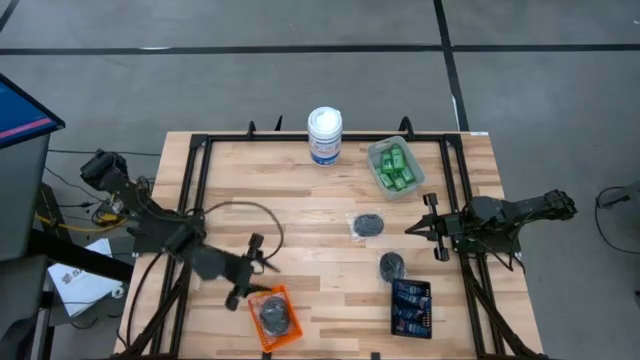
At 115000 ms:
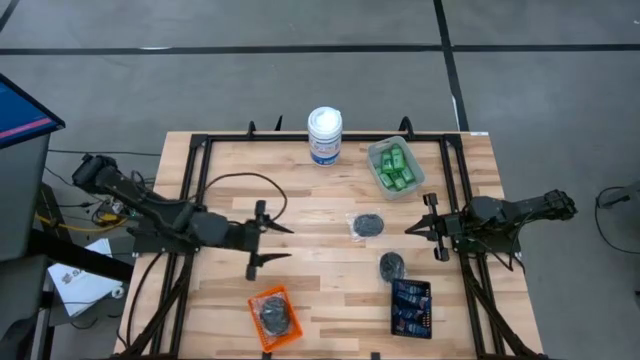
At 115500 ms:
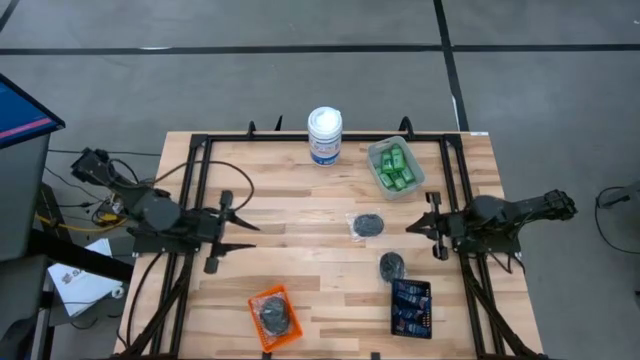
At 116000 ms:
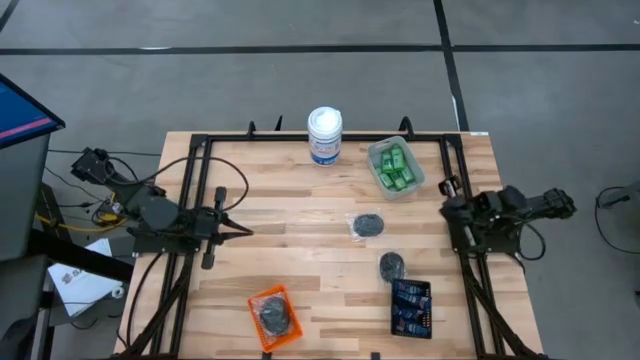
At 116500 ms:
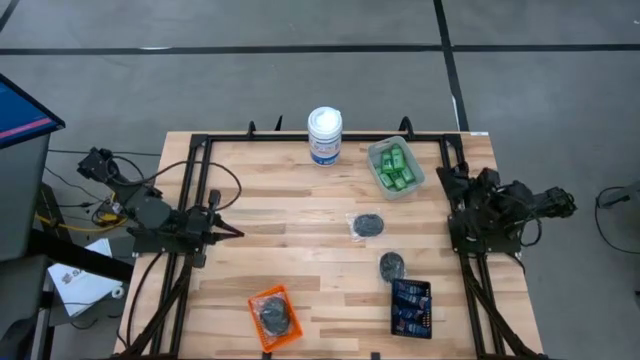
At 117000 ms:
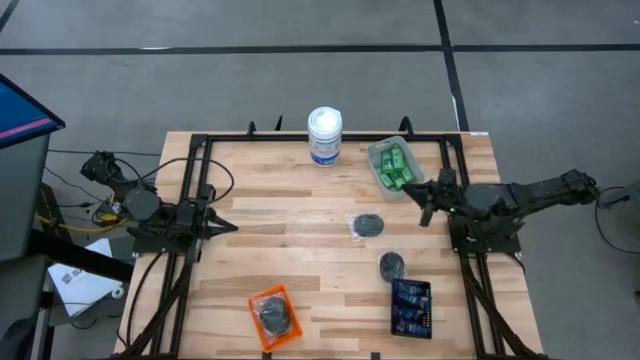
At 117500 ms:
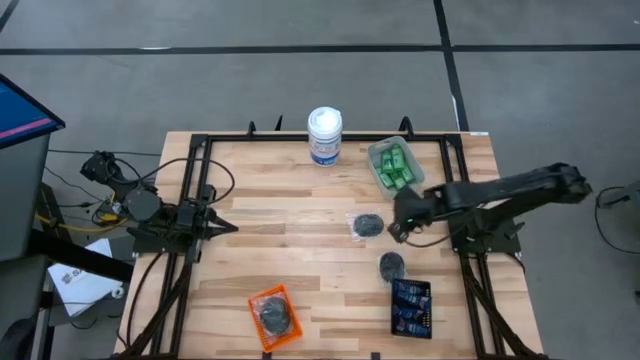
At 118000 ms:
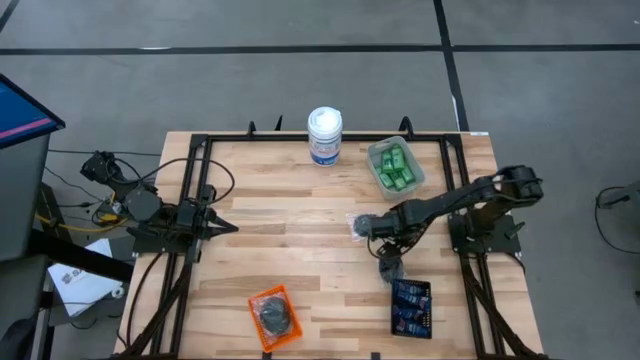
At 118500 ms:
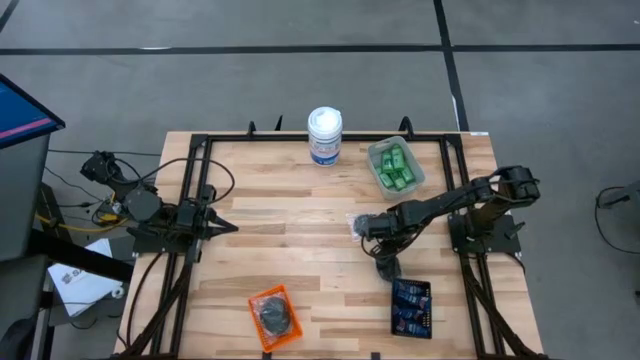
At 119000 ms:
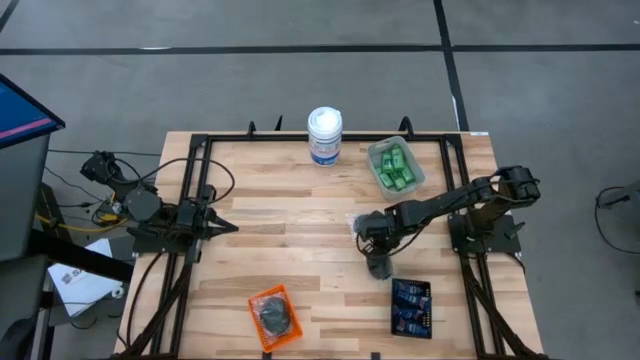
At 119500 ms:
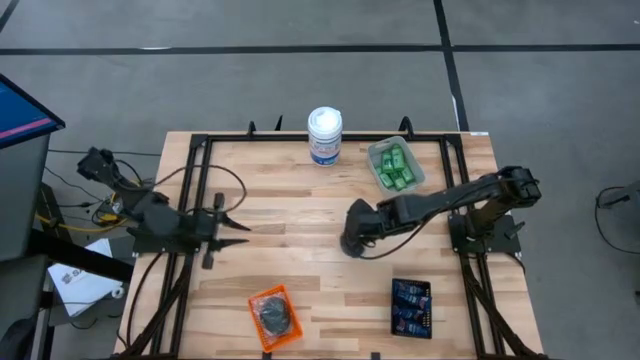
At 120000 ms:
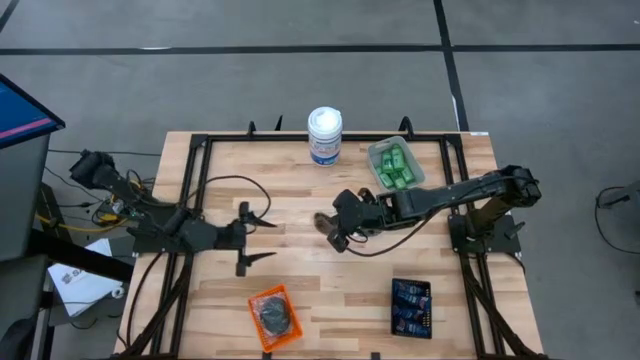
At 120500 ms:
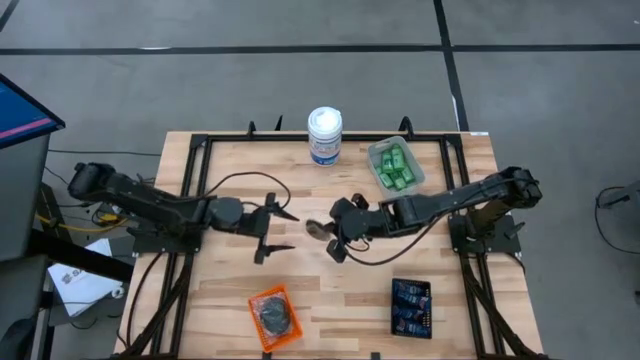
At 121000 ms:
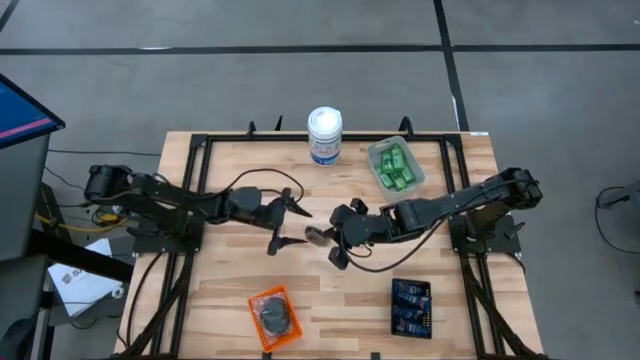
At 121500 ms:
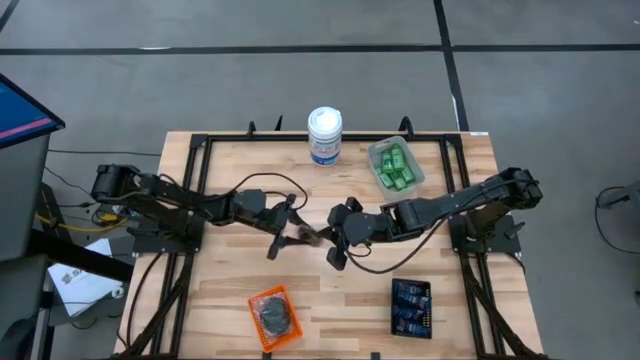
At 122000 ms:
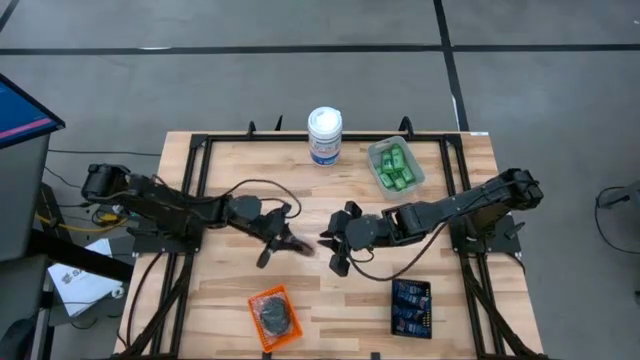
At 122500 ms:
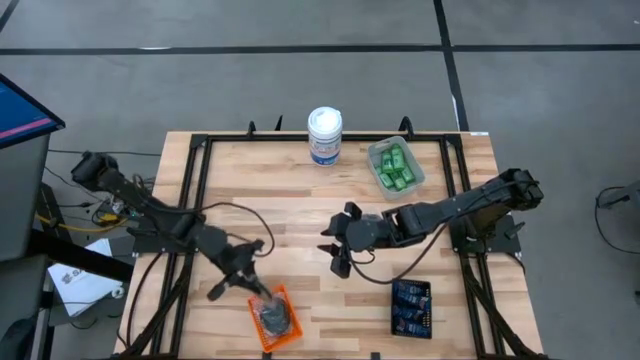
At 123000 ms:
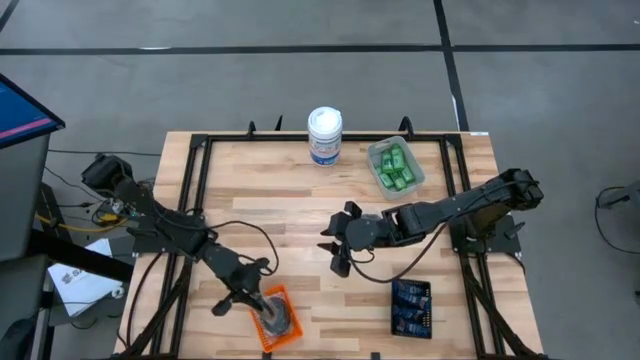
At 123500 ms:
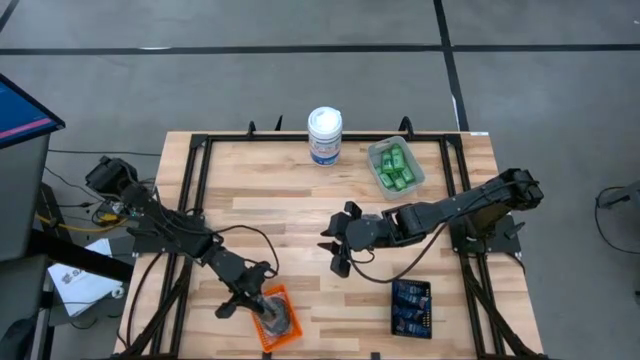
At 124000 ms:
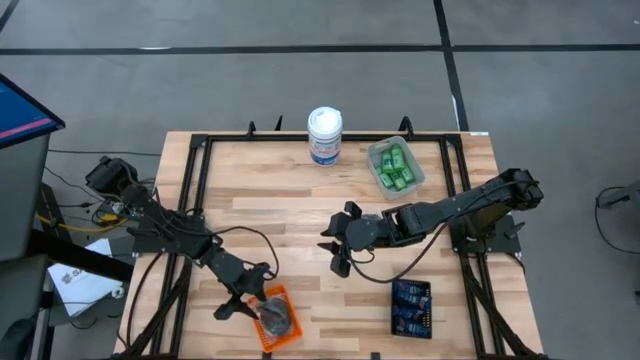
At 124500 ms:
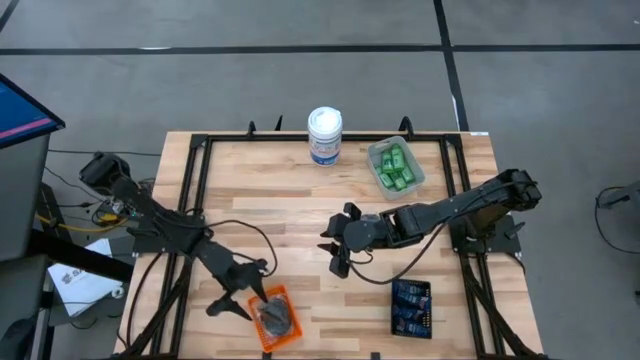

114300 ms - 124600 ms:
Task: Pick & Place Travel size toiletries
Put the black scrub pad into the orange basket

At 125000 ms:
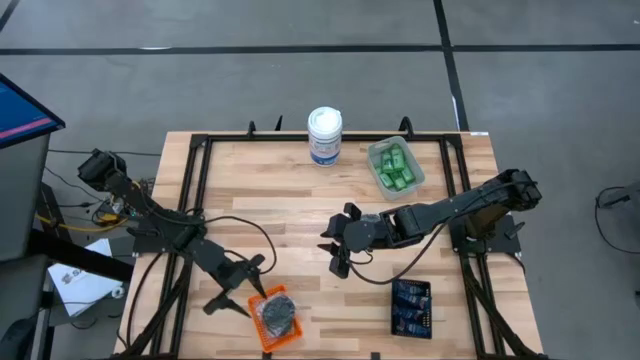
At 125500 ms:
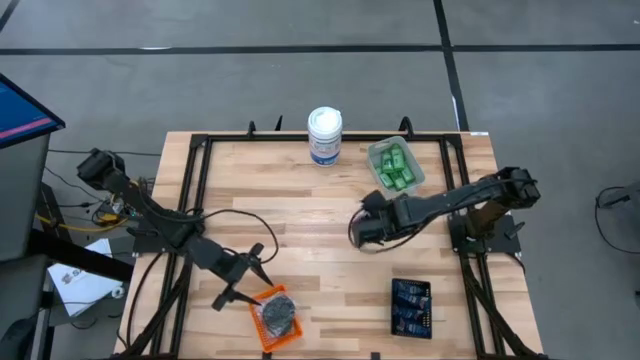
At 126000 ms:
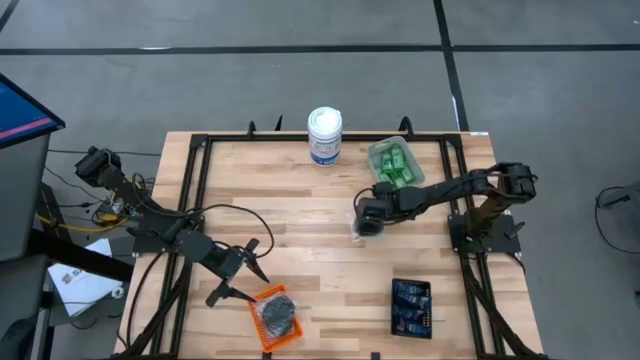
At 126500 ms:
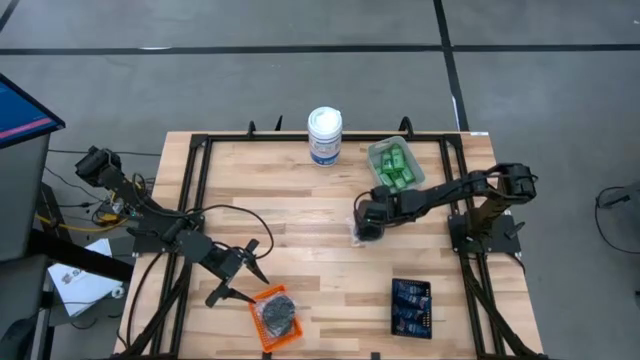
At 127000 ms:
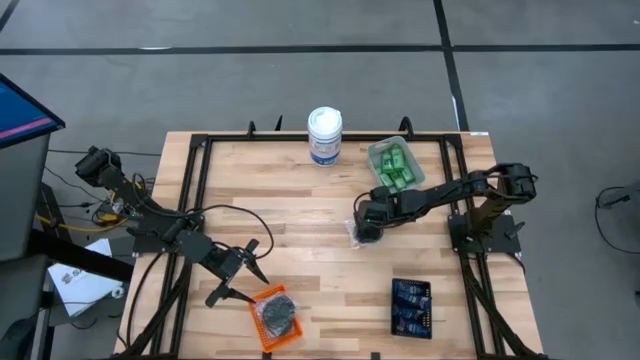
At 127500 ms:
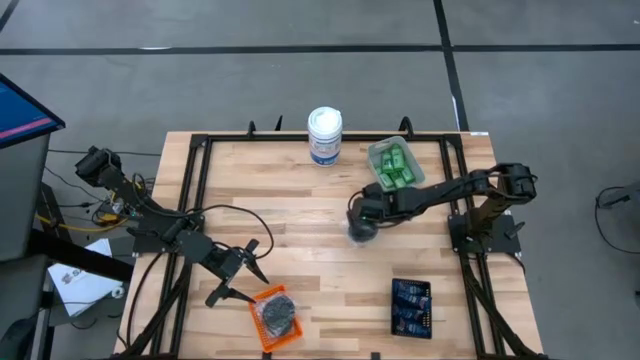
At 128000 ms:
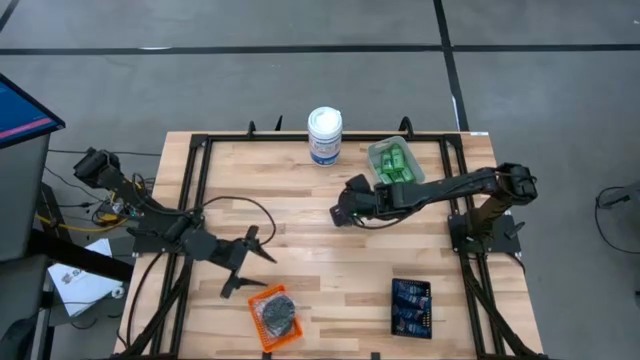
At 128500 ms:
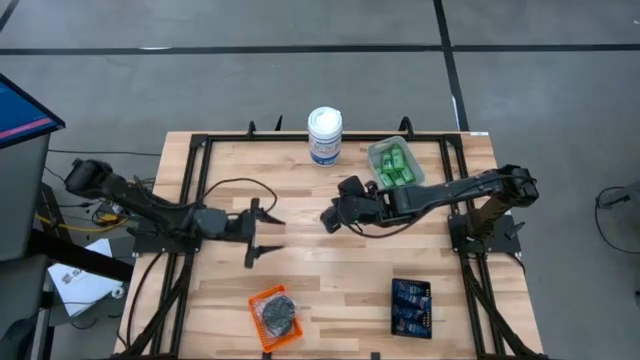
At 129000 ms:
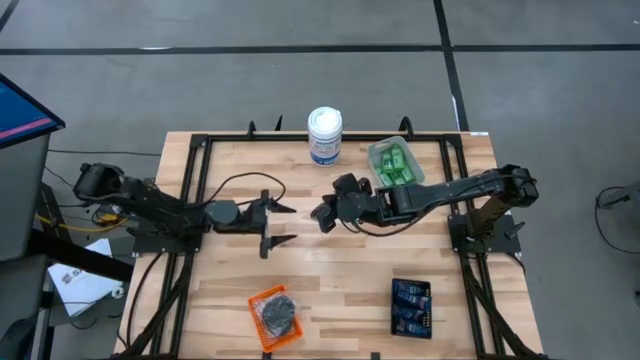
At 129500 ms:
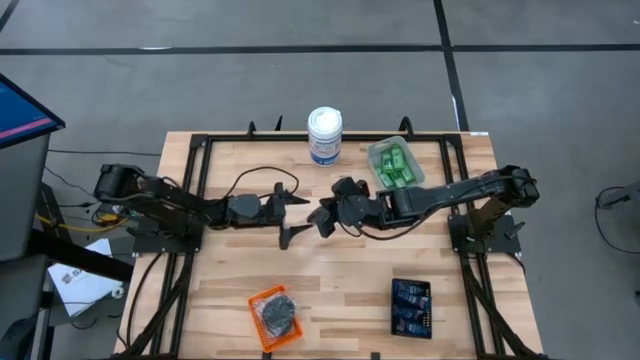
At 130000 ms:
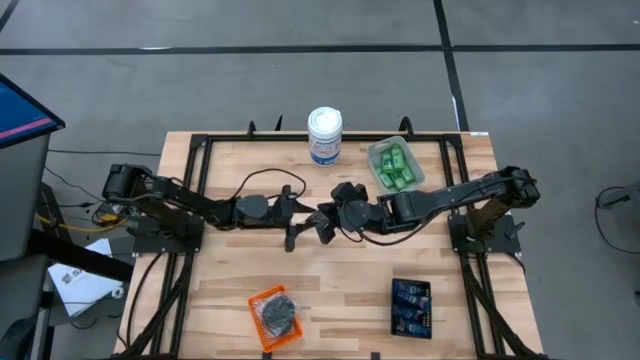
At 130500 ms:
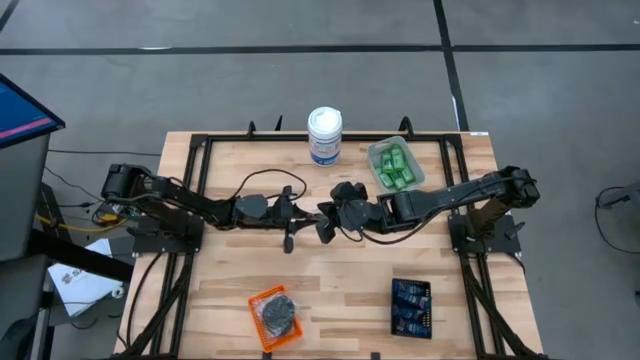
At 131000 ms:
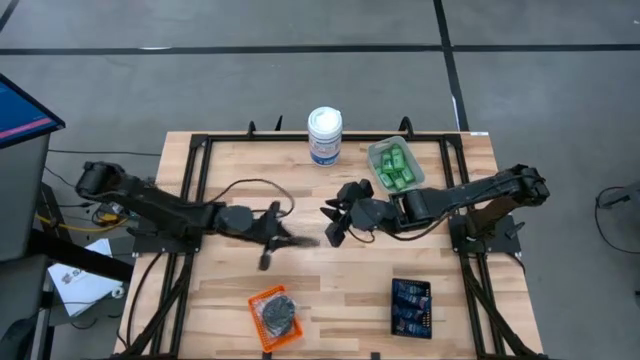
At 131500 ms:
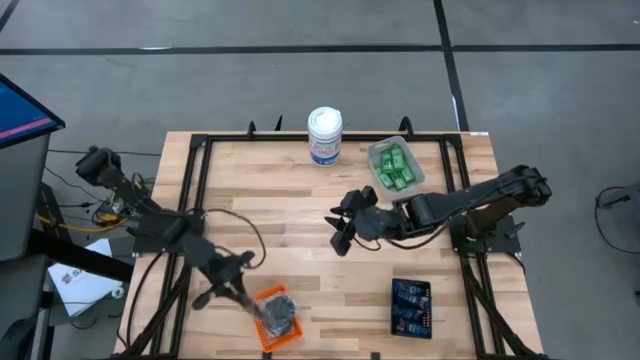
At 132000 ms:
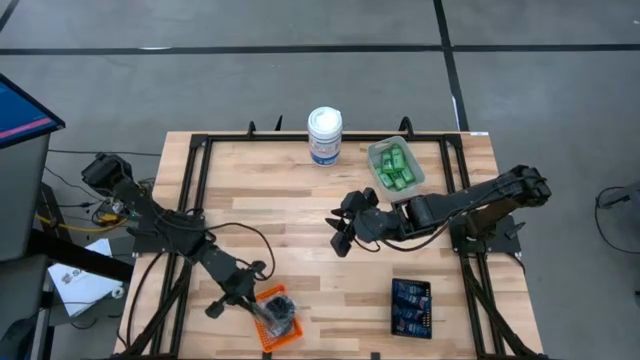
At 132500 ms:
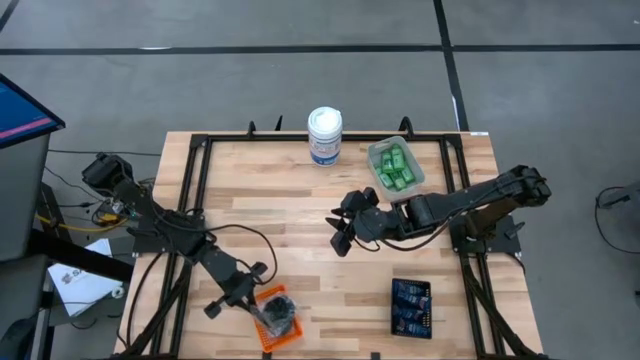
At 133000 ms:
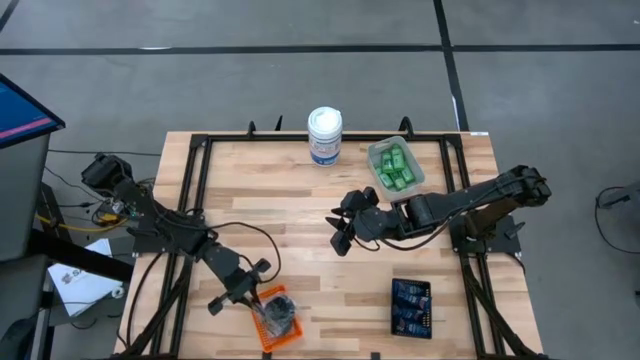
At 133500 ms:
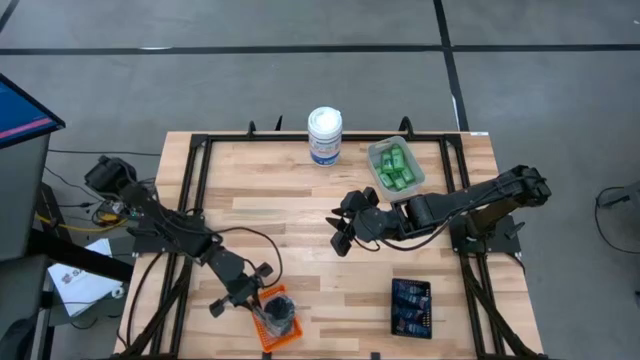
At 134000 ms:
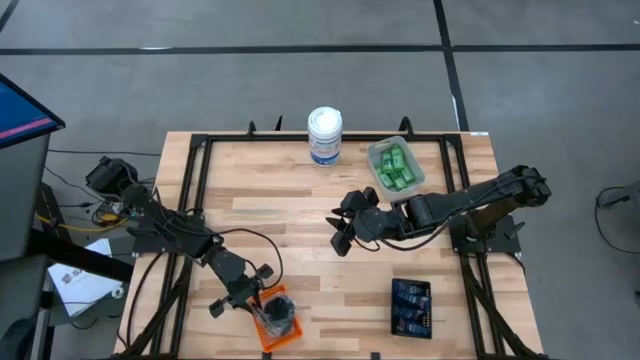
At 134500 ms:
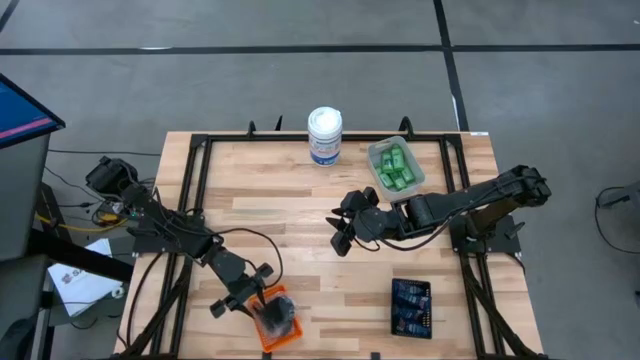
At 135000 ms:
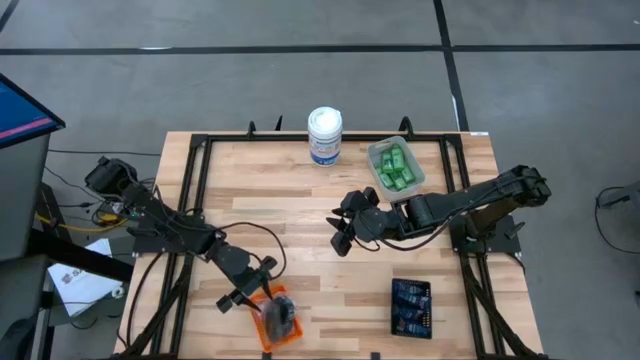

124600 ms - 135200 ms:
Put the black scrub pad into the orange basket

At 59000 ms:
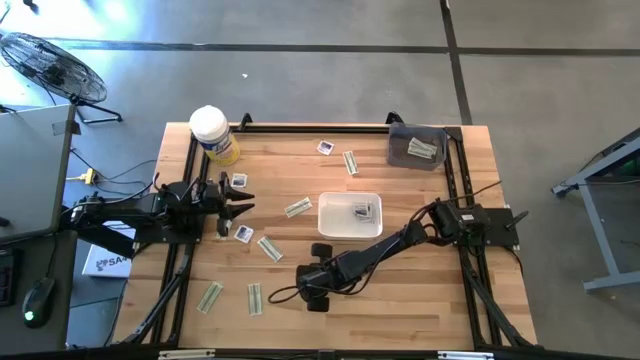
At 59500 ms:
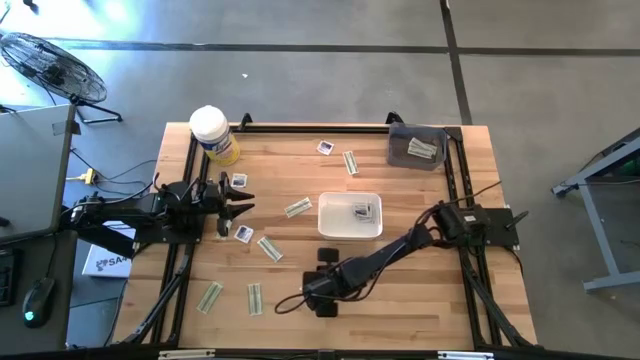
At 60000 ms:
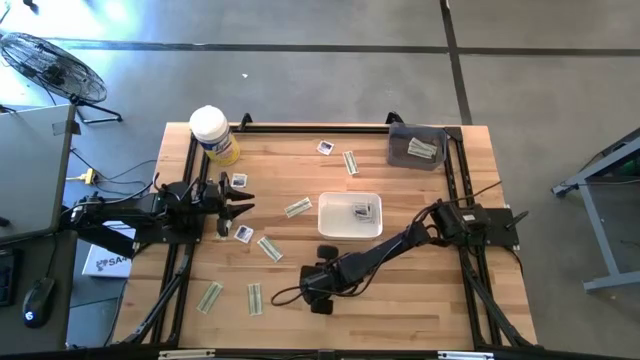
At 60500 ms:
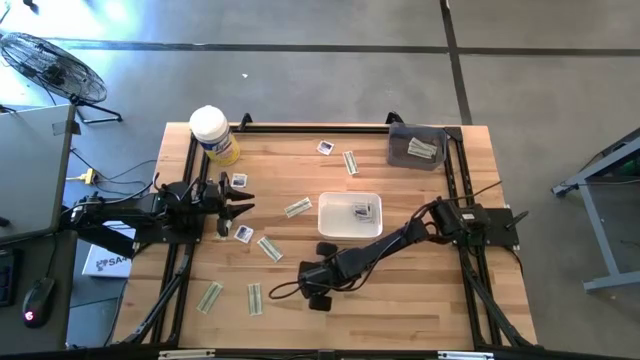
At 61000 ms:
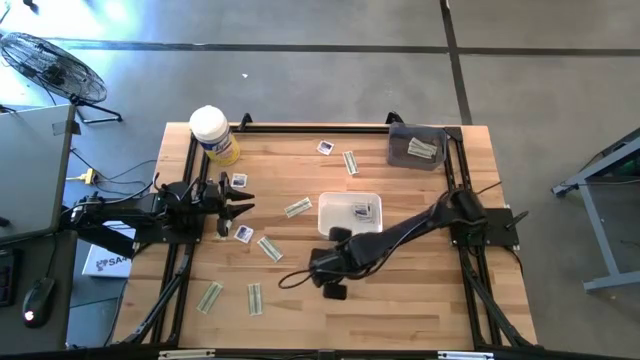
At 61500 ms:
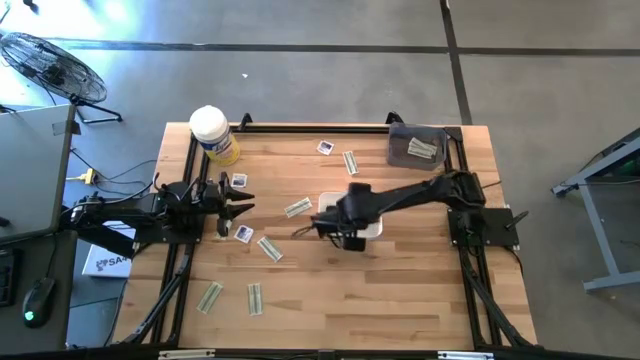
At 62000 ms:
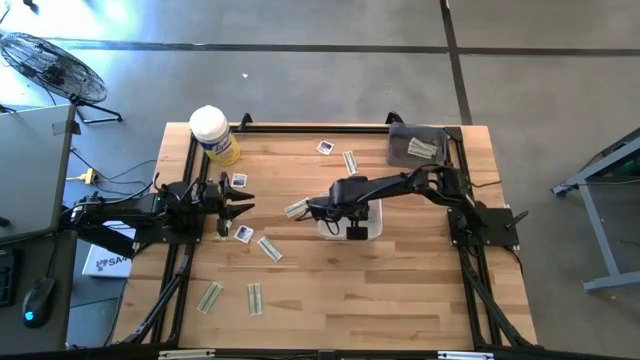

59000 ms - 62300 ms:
Task: Pick & Place First Aid Supplies
Put the blue alcohol pad into the white bin
